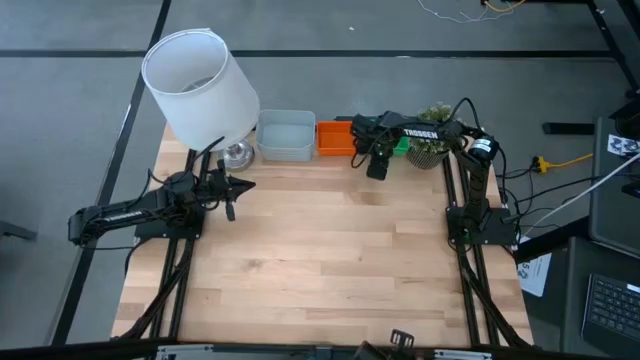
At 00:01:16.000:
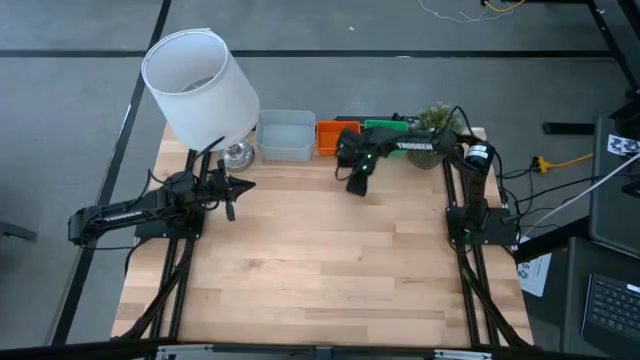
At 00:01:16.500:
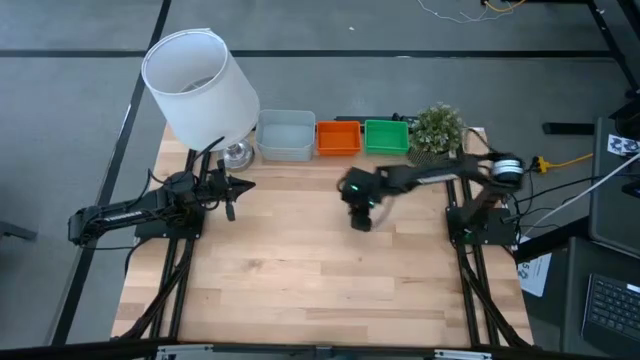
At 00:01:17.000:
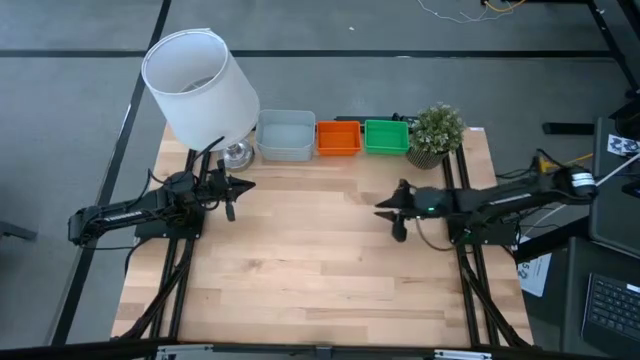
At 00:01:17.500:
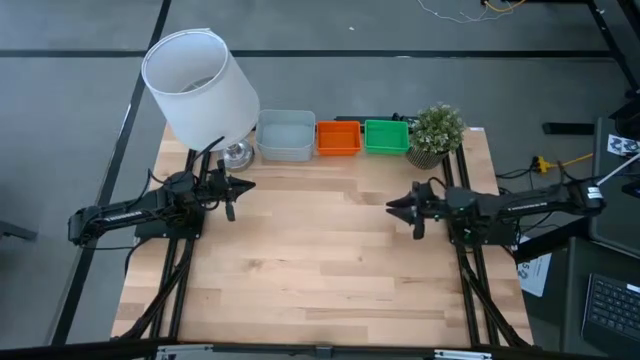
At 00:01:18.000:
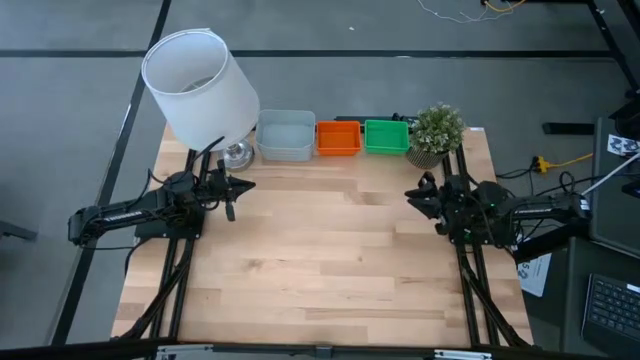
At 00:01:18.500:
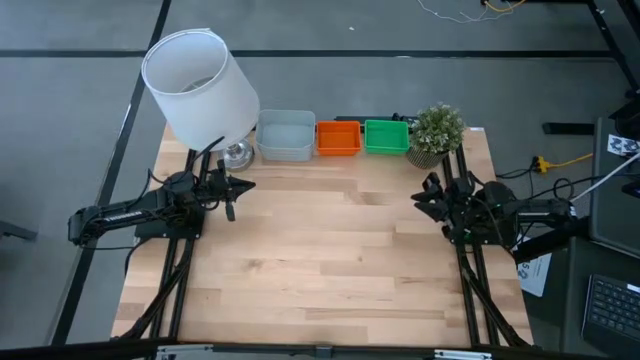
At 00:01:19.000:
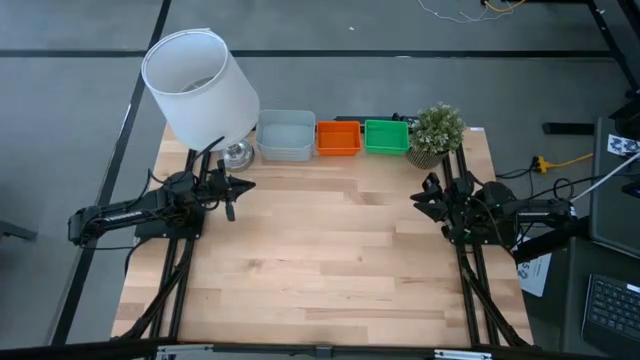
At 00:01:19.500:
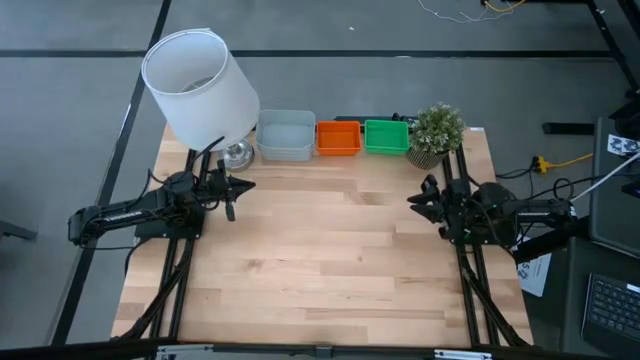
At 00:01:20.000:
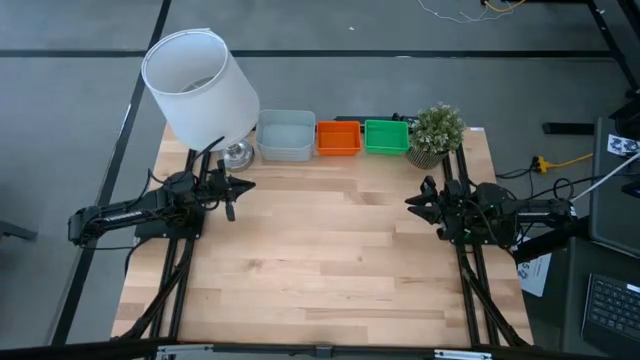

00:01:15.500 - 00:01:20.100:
Return to Home Position
